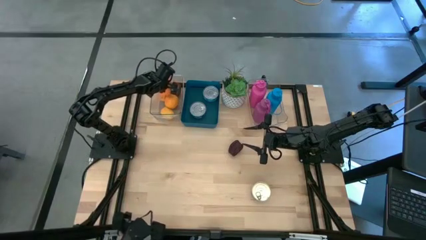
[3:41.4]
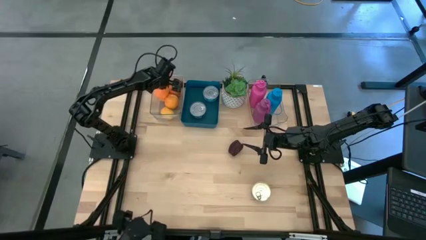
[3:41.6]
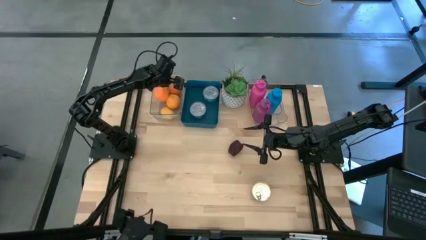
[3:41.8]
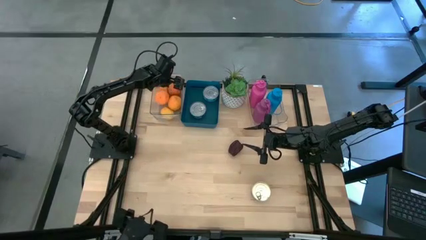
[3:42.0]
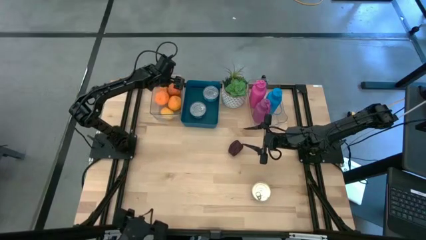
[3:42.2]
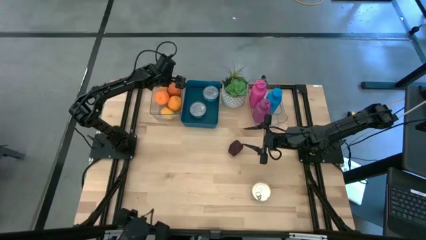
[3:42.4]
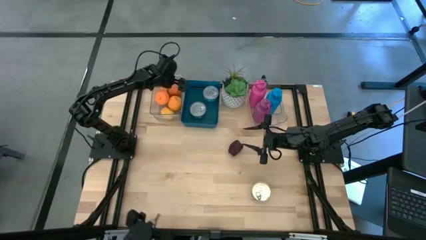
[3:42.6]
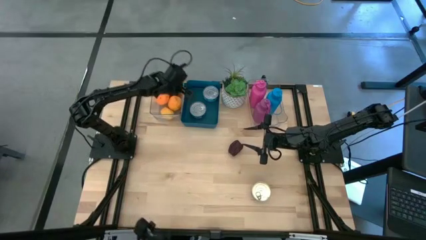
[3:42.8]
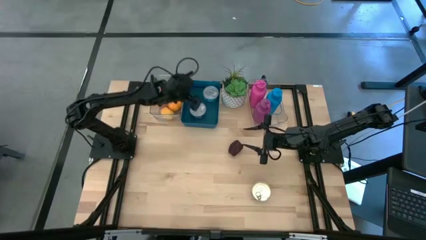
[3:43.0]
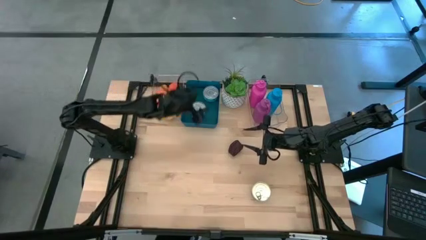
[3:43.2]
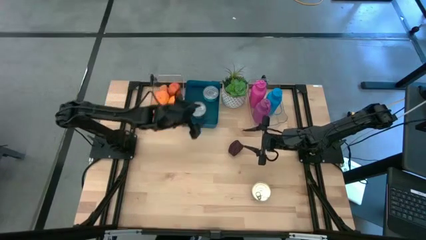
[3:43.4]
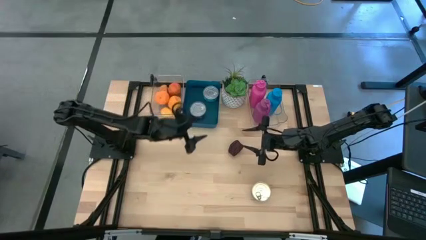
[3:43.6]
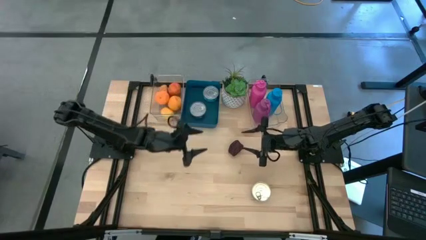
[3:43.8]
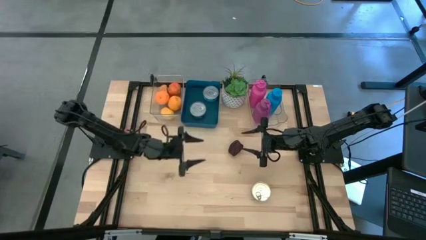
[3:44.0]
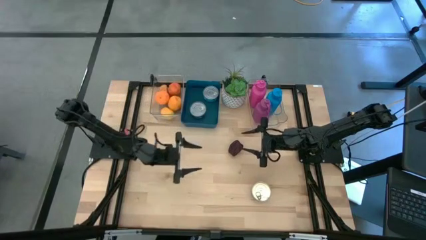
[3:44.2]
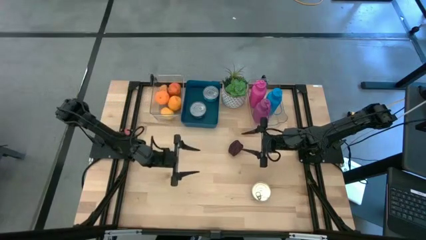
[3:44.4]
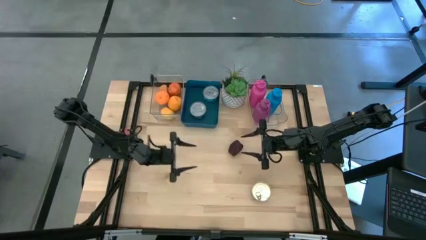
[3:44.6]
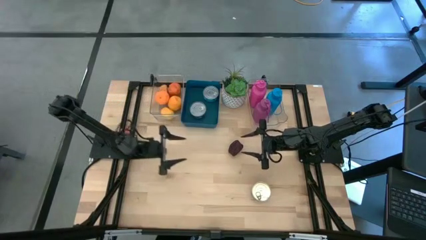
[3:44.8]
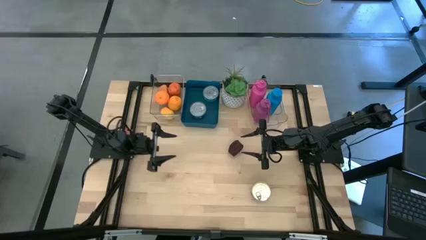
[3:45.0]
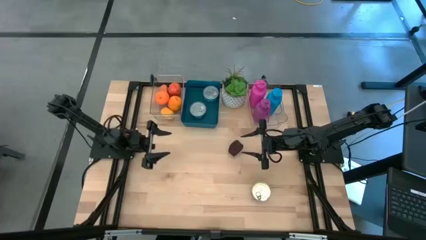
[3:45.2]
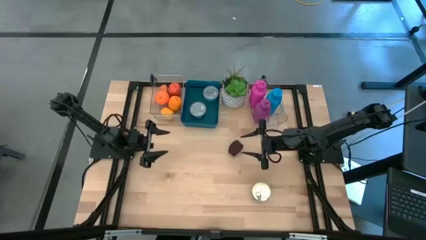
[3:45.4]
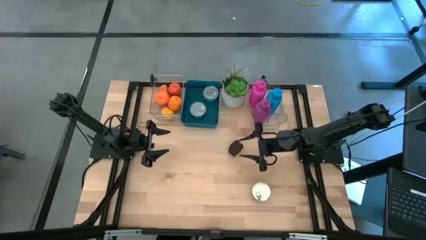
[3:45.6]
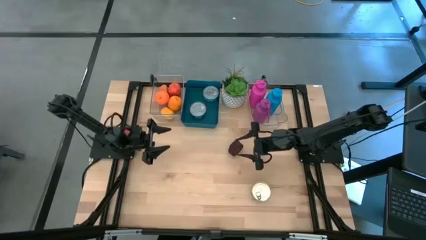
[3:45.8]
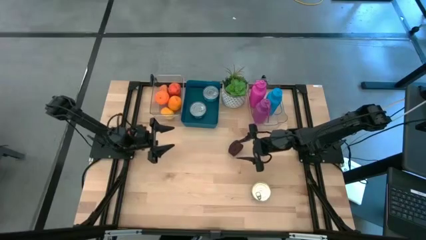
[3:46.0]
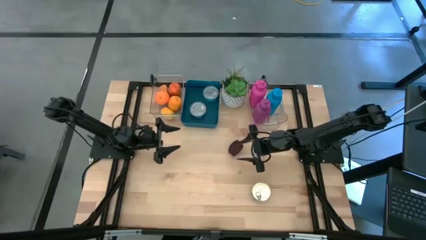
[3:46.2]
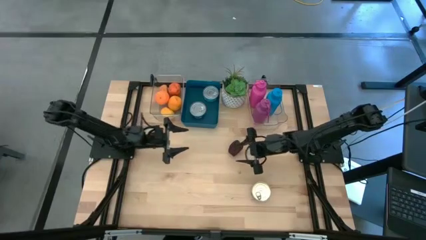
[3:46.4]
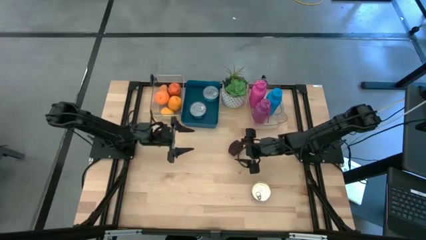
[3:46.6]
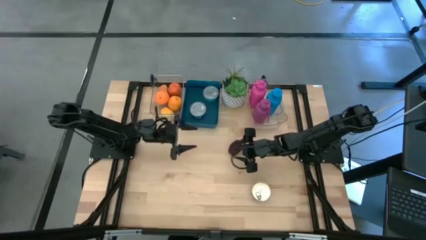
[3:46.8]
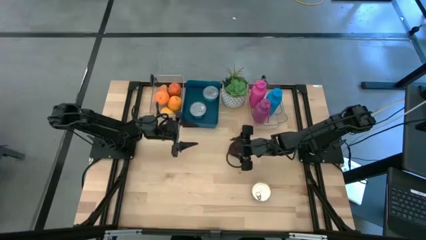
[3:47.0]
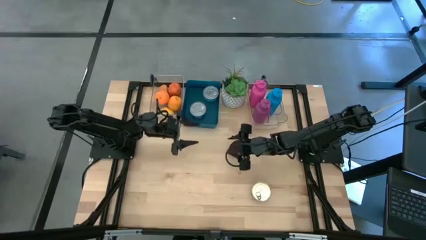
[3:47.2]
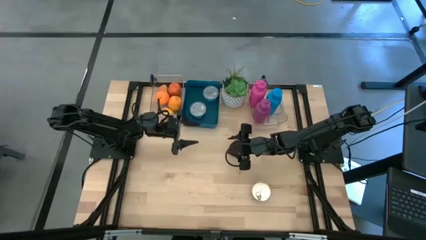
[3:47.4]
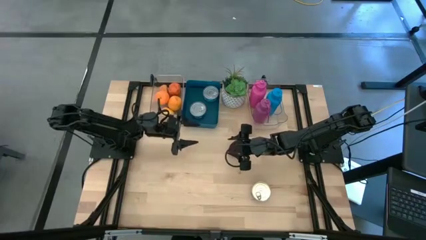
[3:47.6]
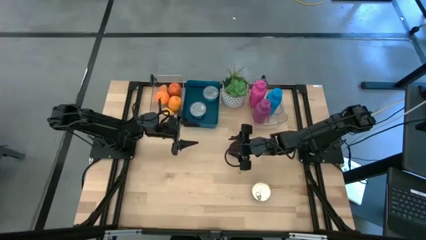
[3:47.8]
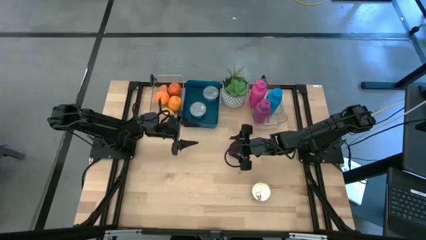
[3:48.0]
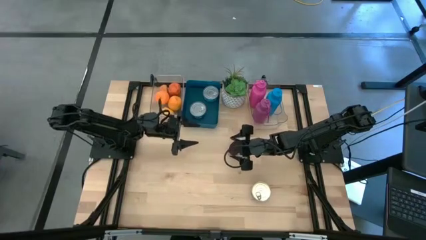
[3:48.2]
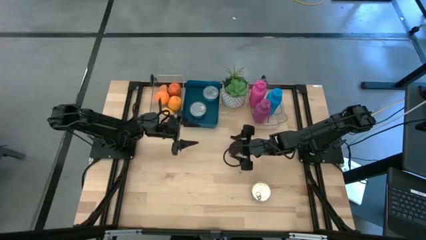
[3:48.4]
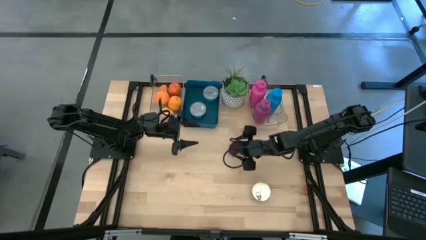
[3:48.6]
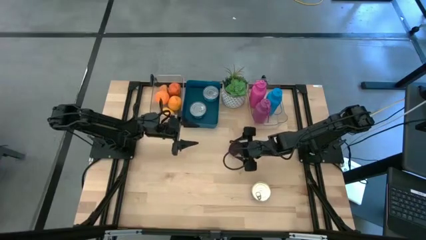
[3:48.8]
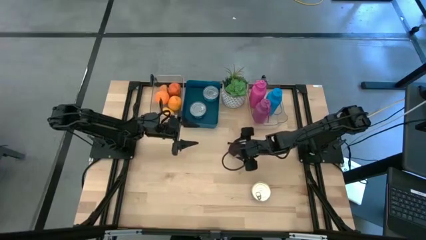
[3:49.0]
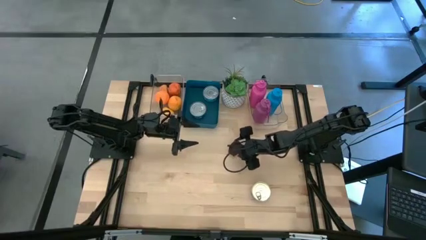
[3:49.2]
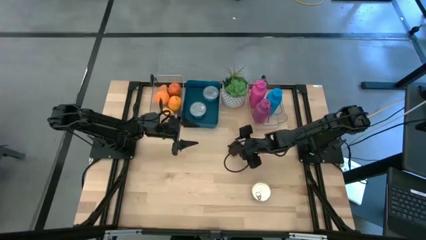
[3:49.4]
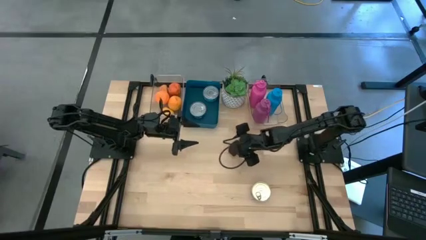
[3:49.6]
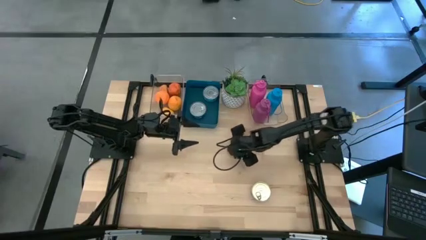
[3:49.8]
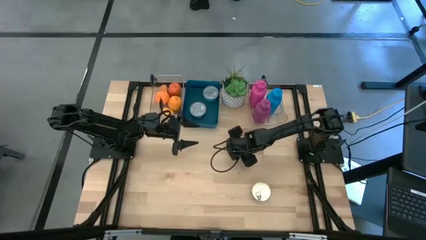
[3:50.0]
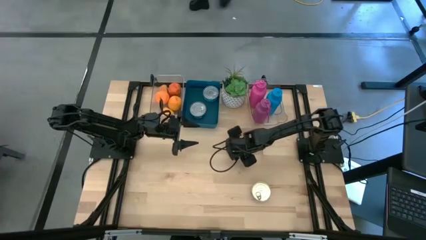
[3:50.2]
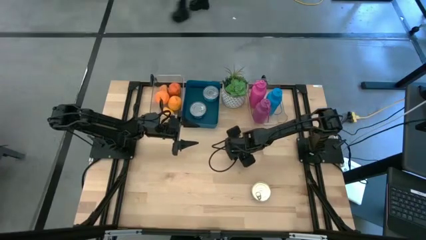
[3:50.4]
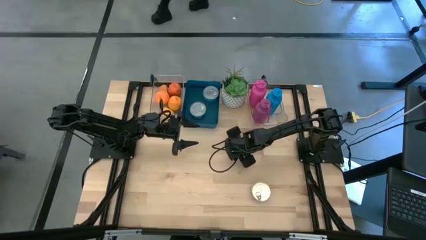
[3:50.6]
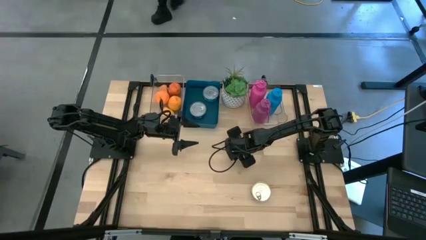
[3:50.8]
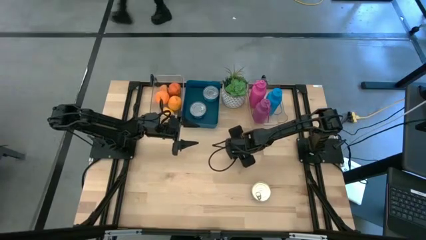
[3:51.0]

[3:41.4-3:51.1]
Task: Pick & Place Food Item
Put the malay apple into the left transparent bin

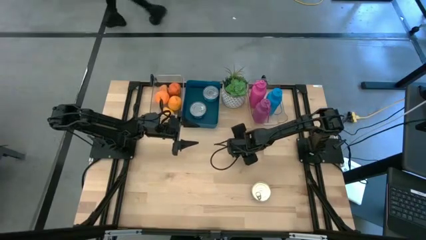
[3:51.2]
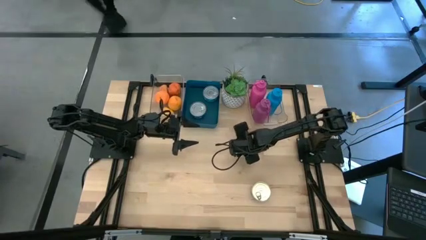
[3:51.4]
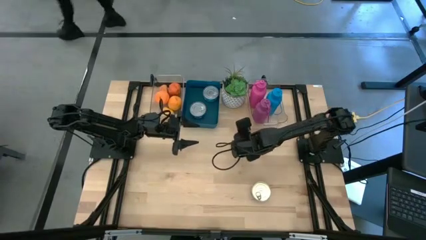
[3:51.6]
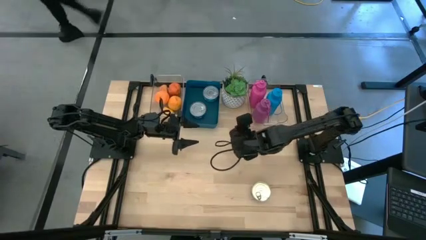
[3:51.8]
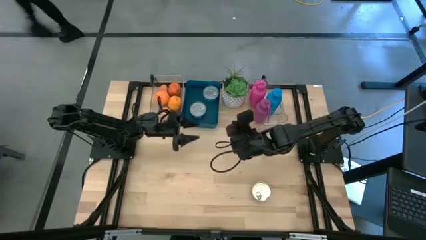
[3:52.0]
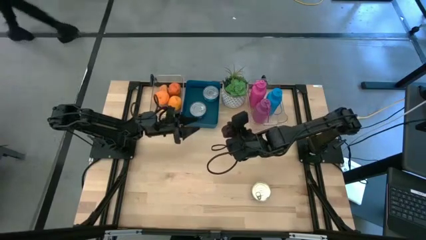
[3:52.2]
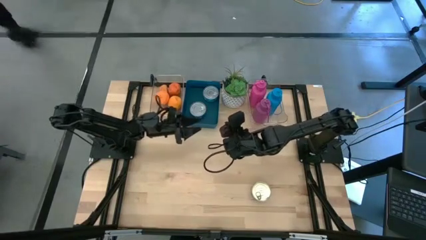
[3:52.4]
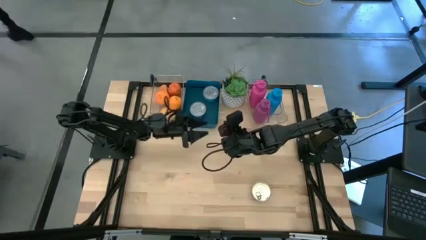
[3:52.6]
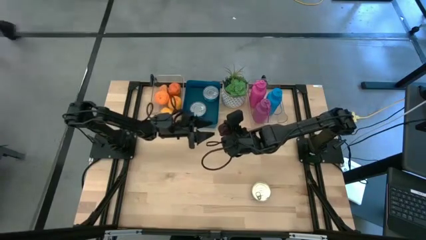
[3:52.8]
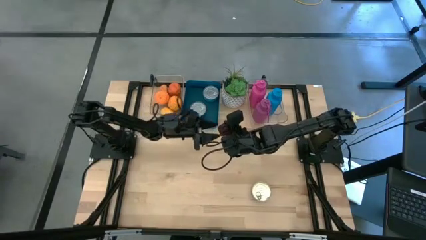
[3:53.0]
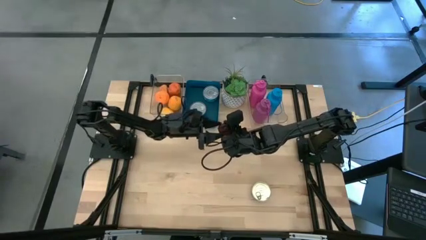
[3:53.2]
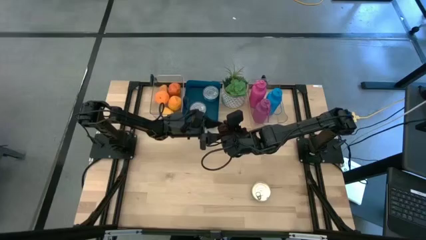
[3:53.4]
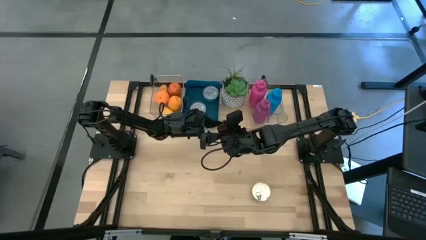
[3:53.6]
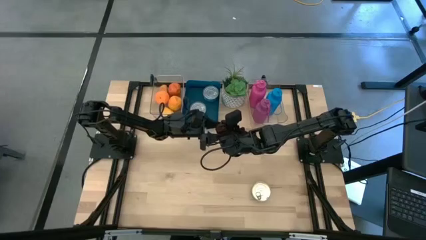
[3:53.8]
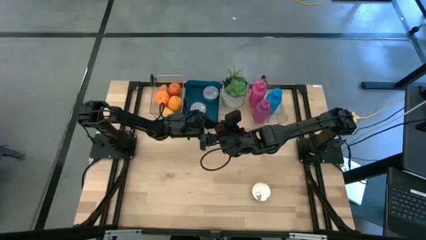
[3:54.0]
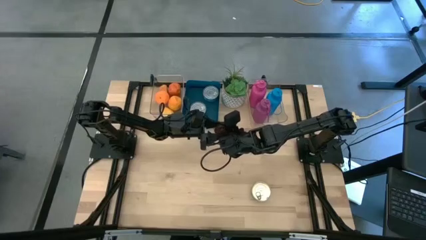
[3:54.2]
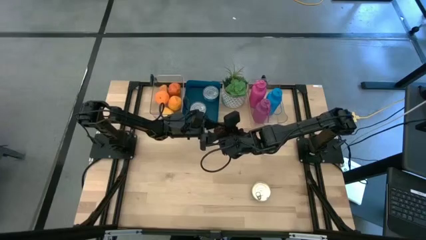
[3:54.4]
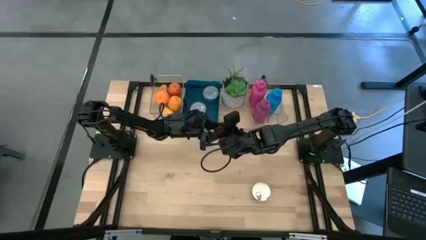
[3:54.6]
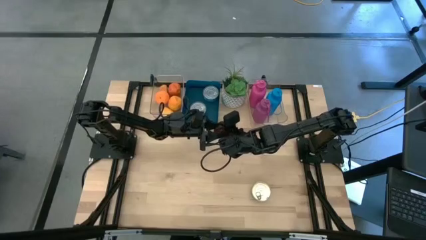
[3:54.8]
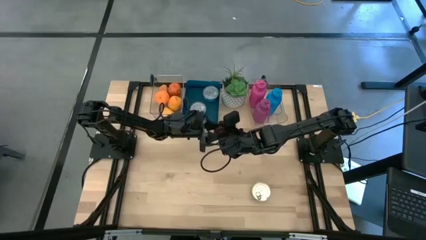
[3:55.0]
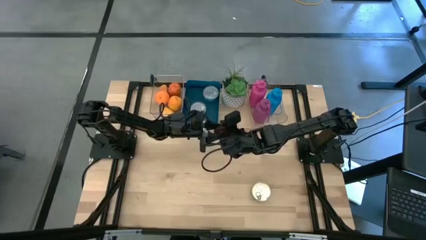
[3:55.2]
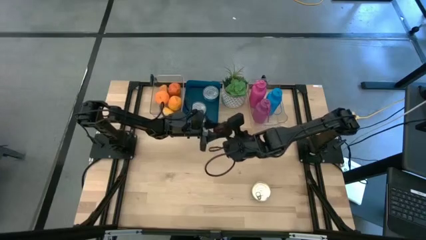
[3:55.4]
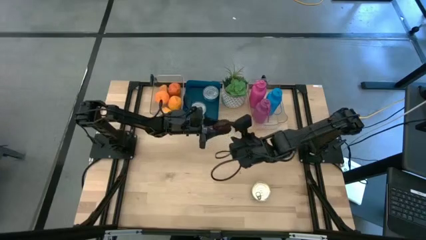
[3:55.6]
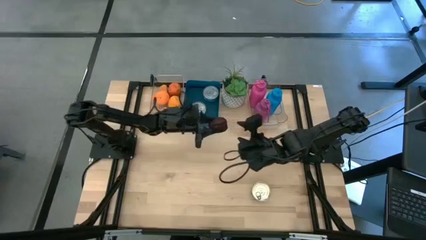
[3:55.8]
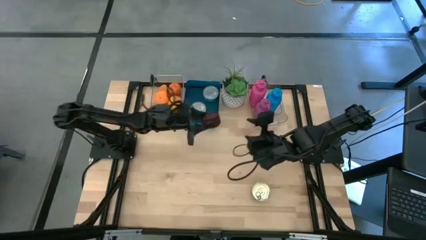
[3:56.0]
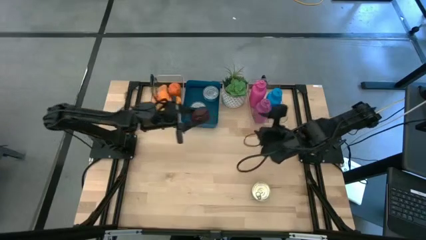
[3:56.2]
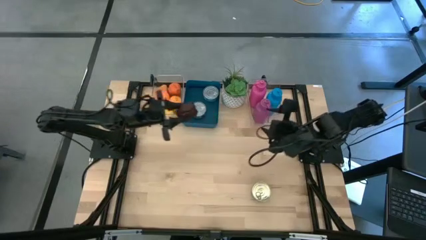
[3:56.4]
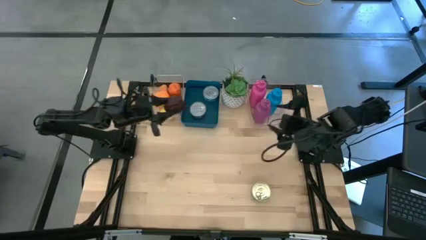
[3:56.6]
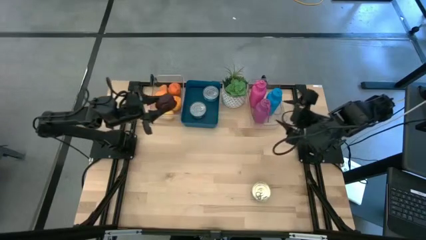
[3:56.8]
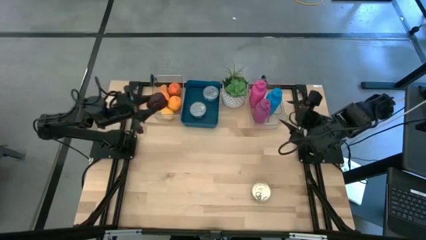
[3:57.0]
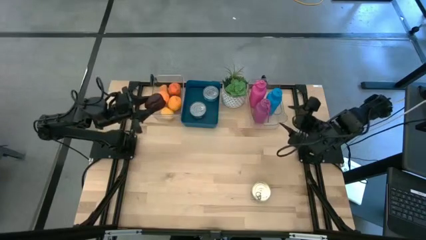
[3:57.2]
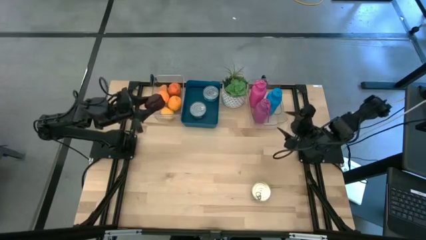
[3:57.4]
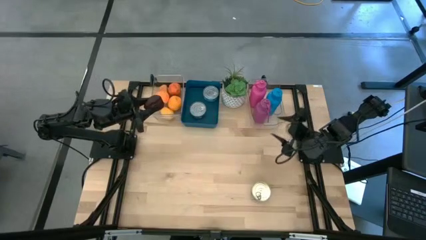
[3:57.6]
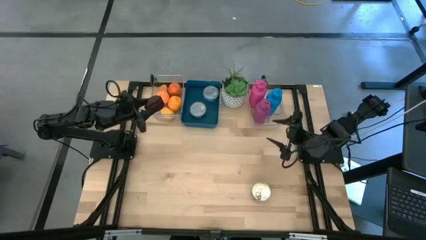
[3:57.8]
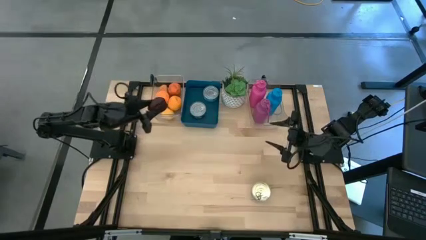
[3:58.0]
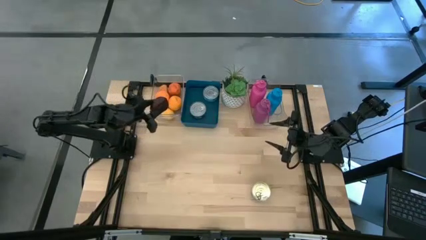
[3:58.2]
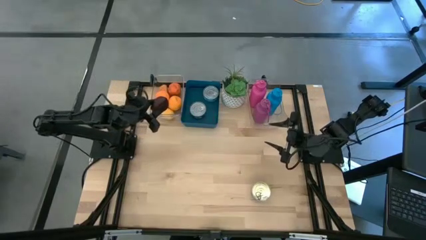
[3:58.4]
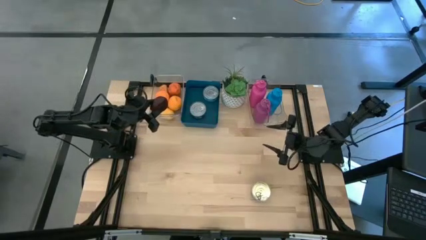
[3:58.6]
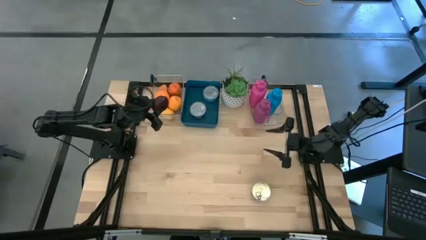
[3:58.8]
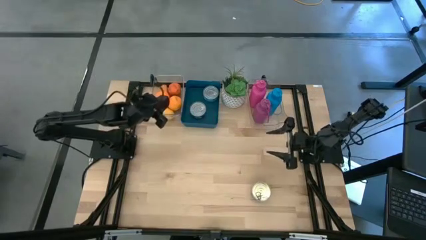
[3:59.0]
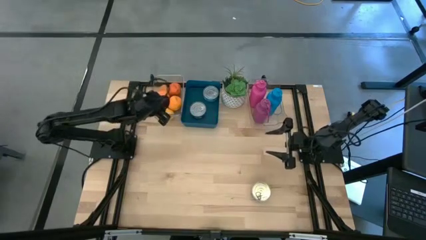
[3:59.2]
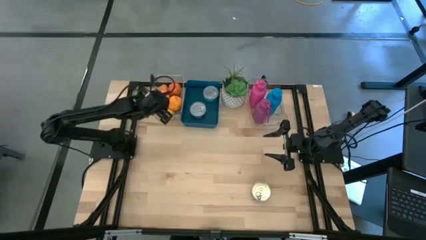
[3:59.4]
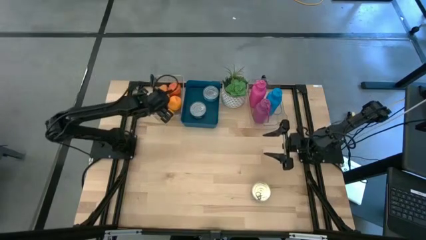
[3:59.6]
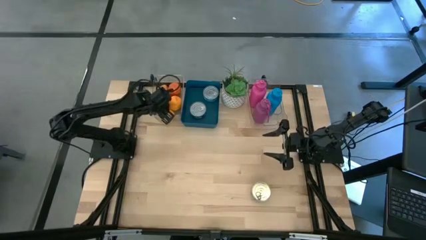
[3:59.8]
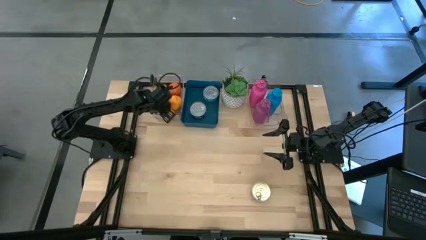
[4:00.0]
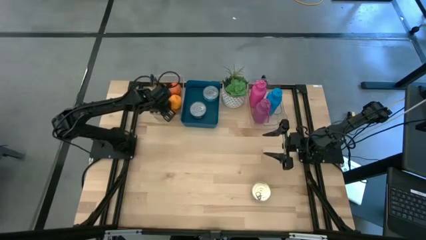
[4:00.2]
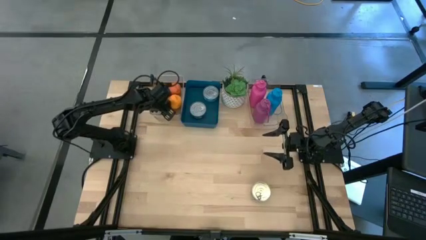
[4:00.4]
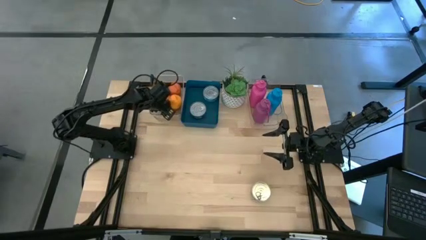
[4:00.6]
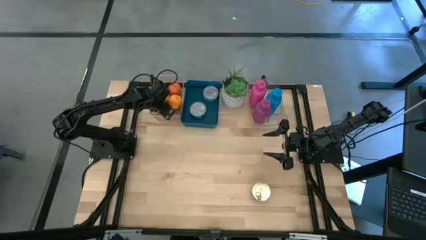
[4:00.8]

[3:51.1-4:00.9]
Put the malay apple into the left transparent bin
